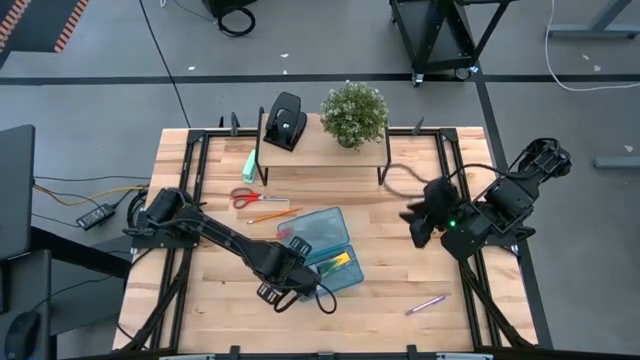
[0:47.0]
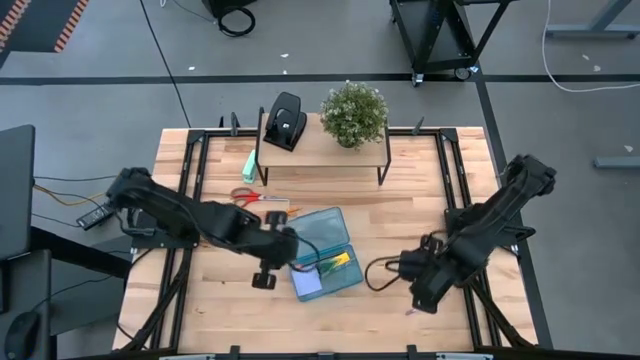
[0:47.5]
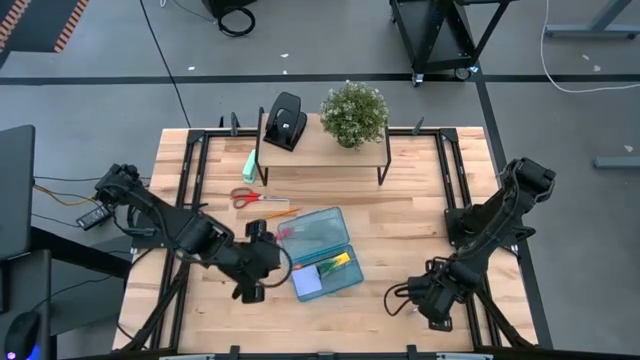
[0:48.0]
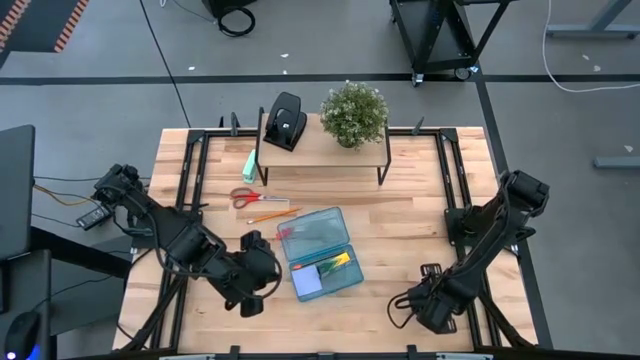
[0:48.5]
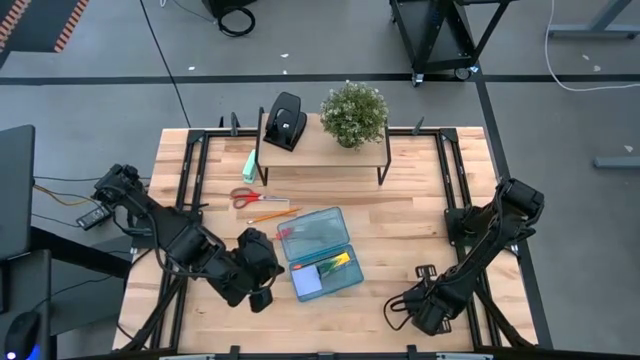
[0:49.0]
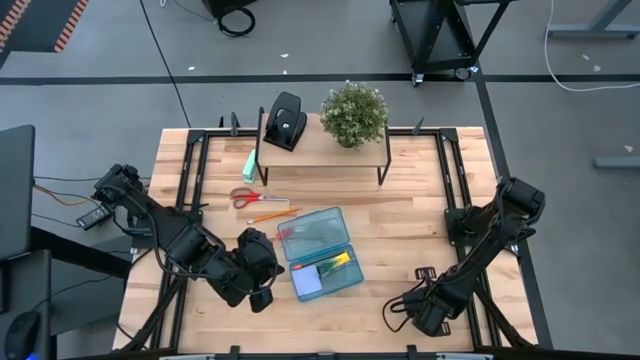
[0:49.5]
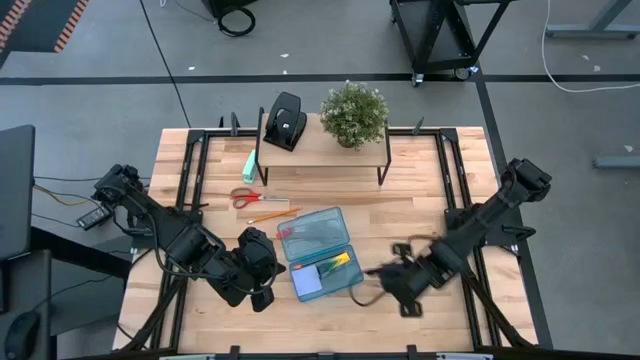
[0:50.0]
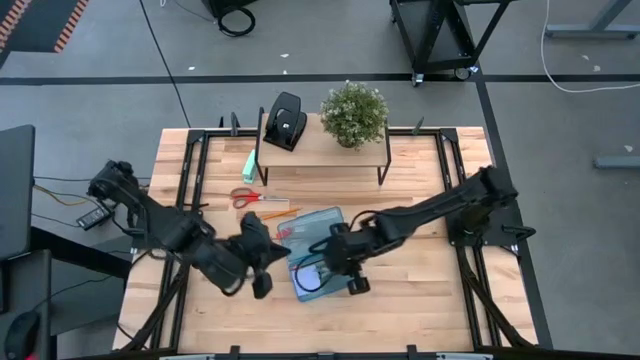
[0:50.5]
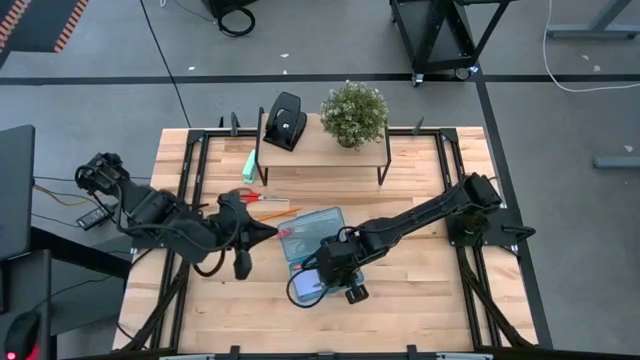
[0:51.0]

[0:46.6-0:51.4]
Task: Pack school essentials
Put the purple pen into the blue supply box

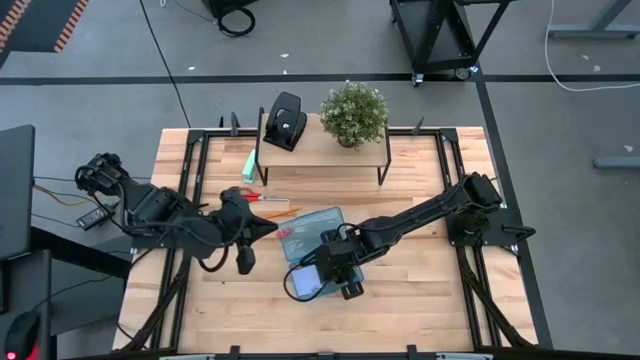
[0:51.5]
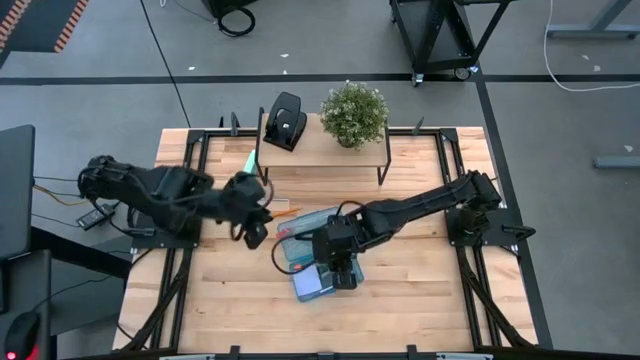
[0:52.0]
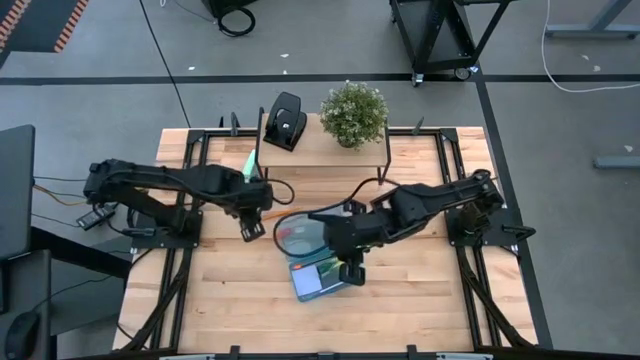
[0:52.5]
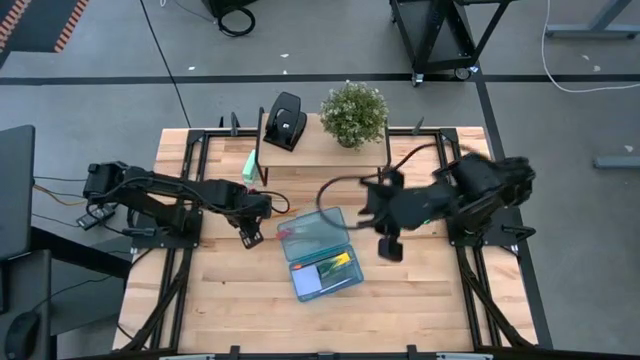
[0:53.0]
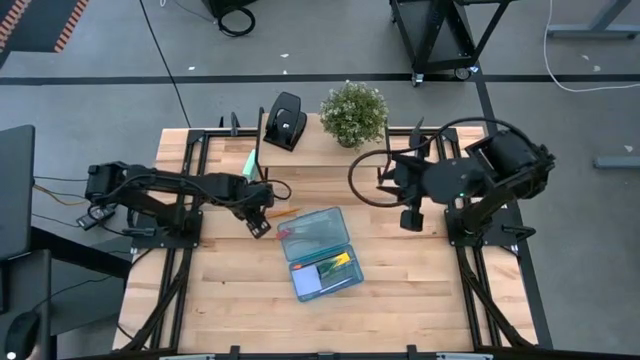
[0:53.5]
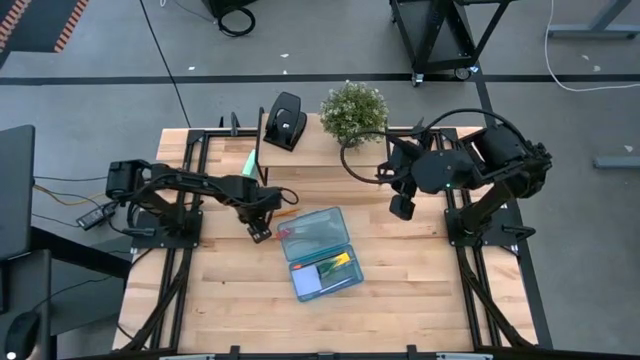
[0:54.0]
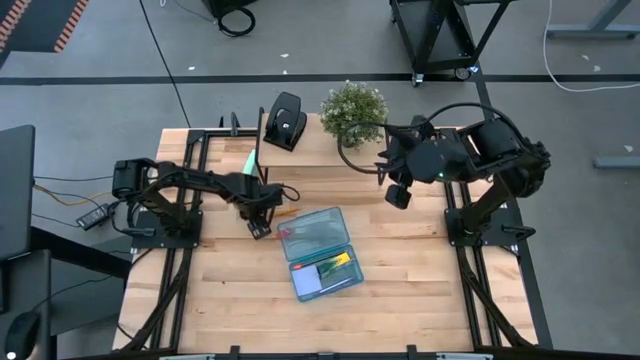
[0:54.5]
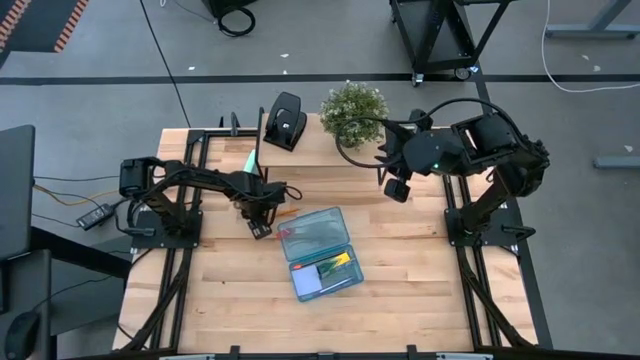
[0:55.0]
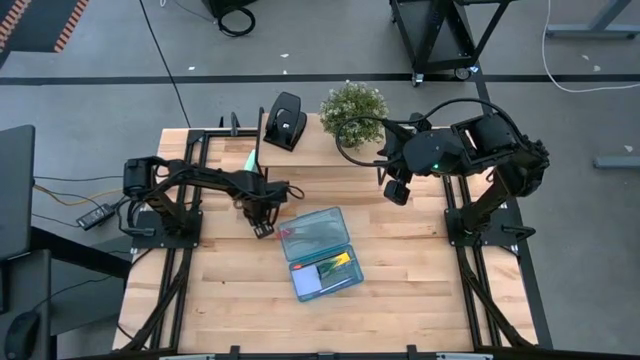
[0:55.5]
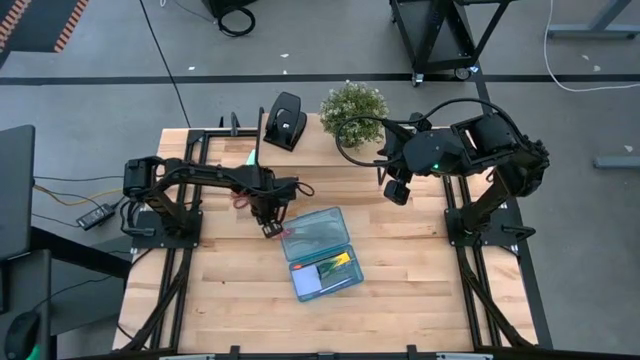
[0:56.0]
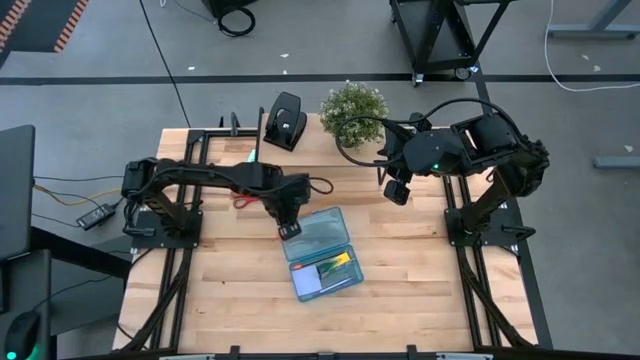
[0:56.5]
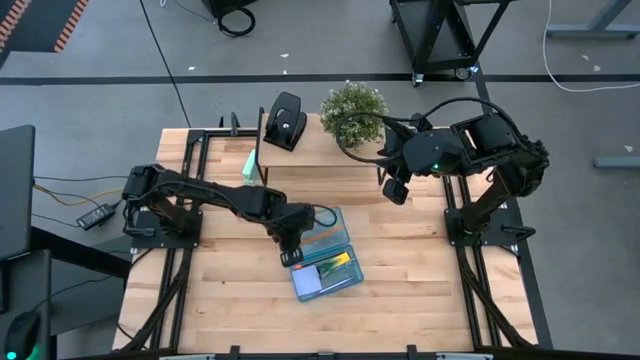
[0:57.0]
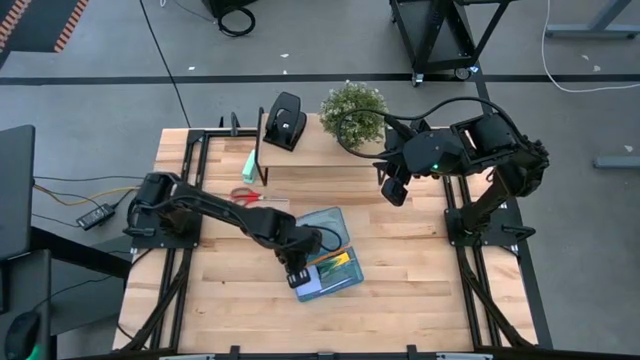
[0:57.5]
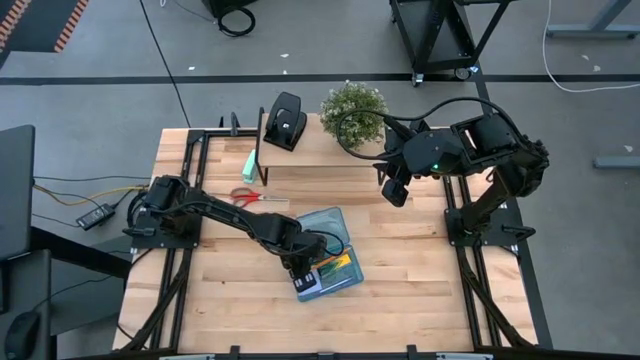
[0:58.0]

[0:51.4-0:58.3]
Put the orange pencil into the blue supply box

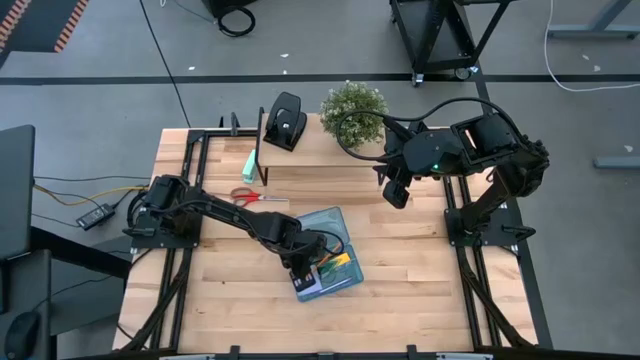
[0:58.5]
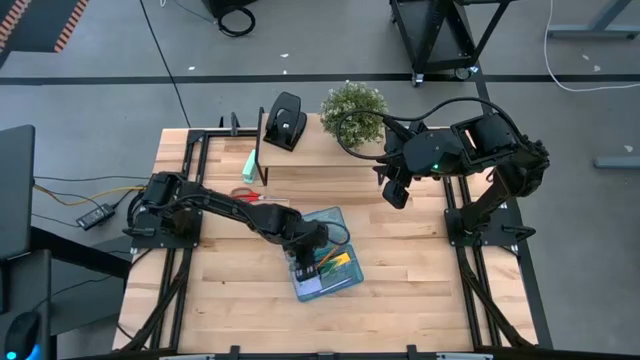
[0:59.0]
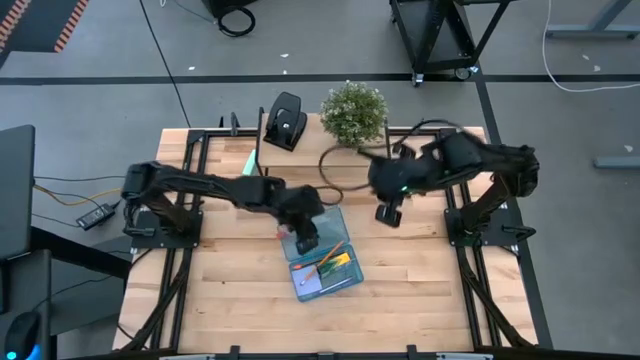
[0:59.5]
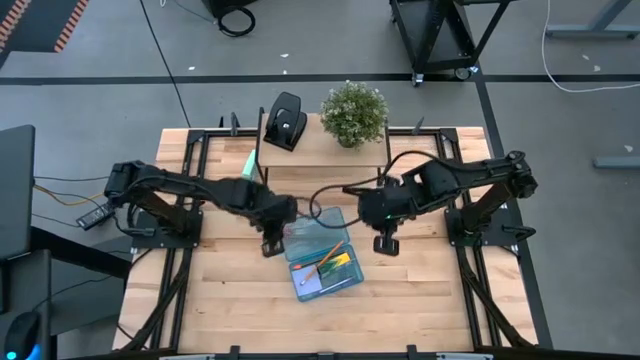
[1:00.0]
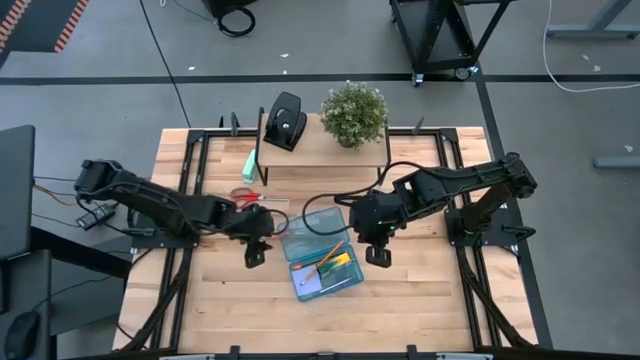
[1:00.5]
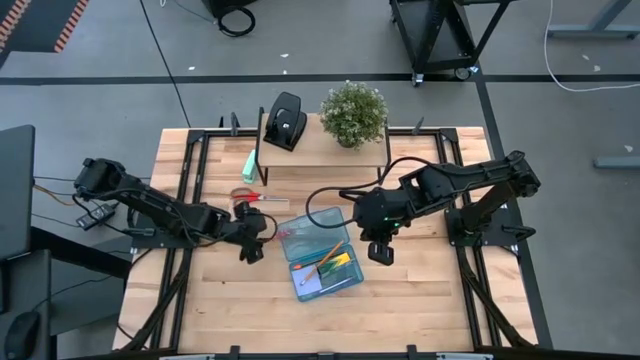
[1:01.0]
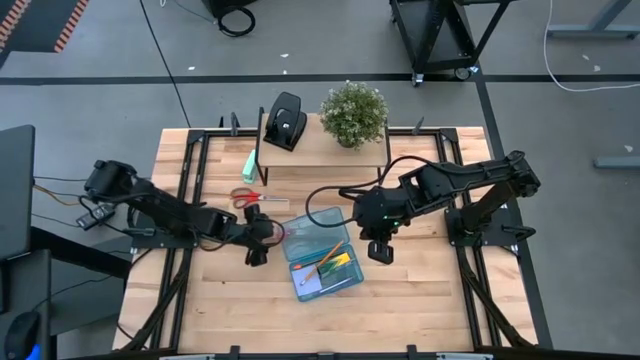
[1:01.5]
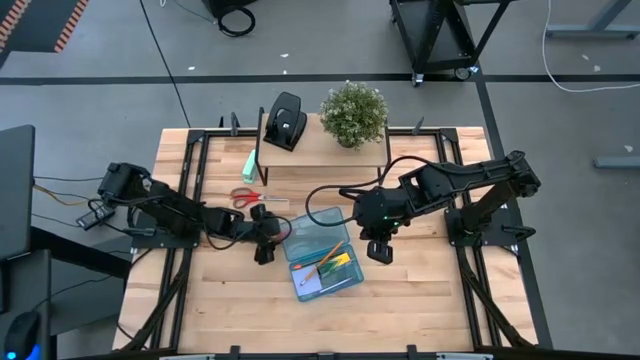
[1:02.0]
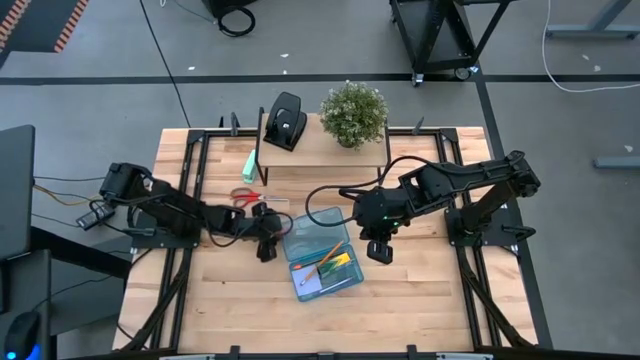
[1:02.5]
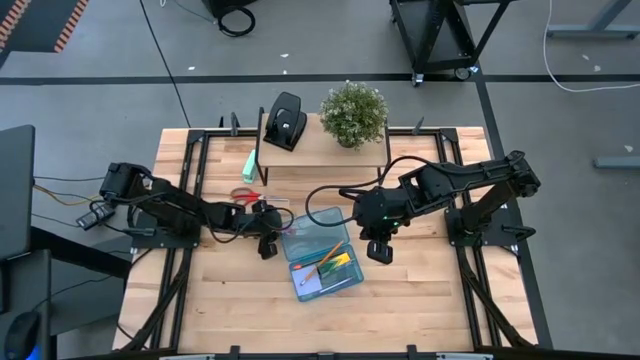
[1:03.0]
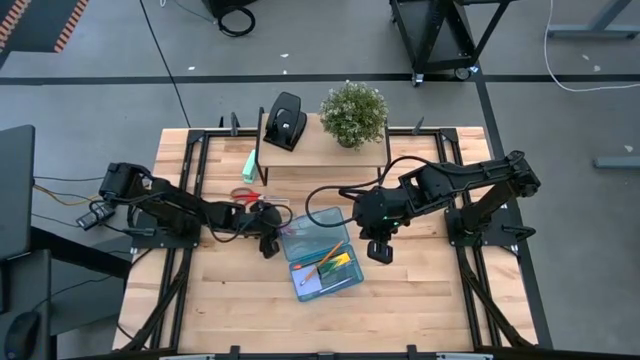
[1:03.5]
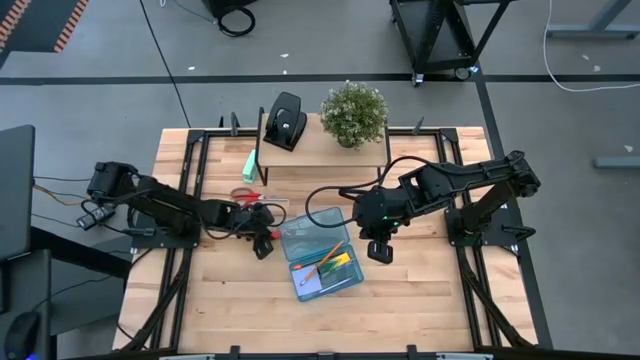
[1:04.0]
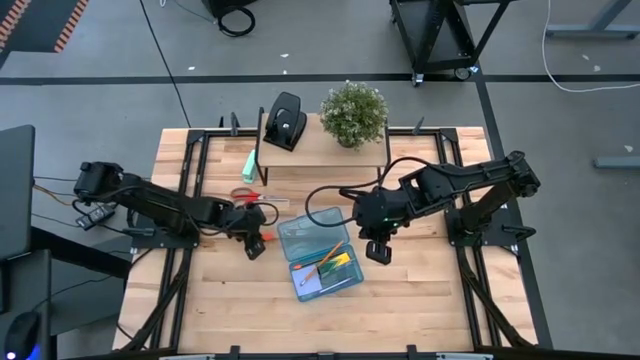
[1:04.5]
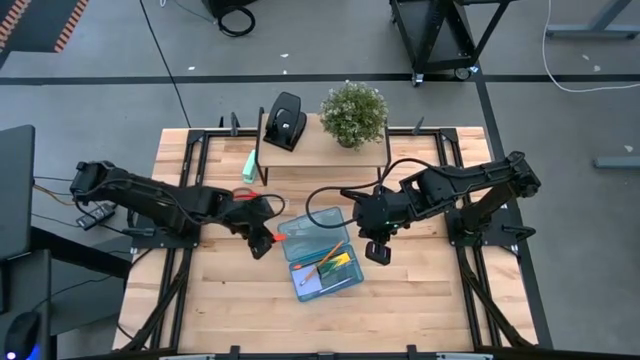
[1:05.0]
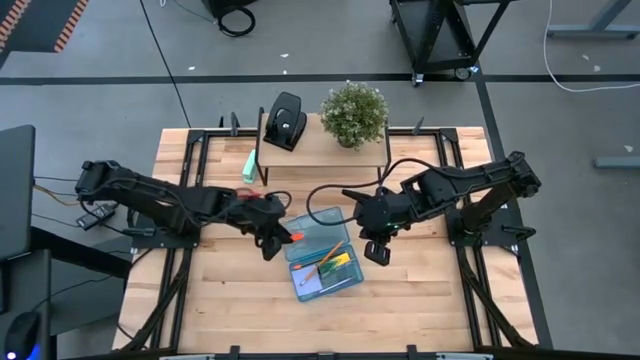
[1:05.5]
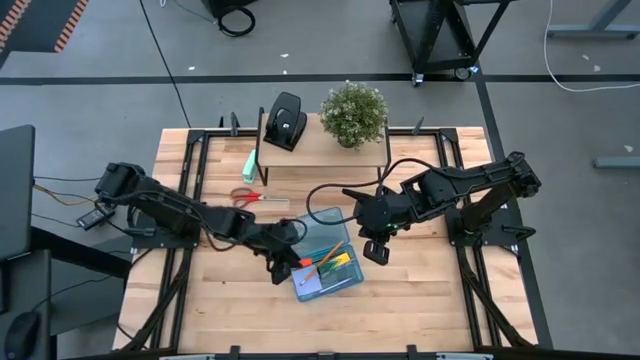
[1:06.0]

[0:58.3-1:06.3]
Put the orange eraser into the blue supply box

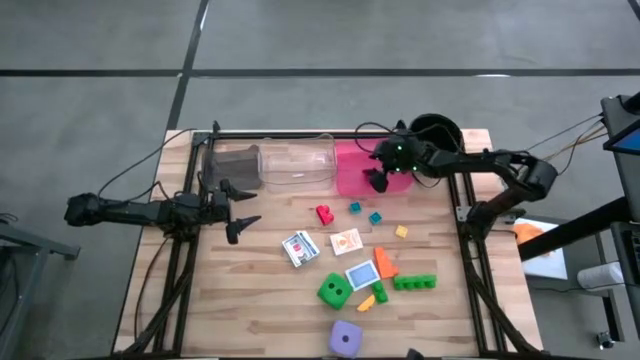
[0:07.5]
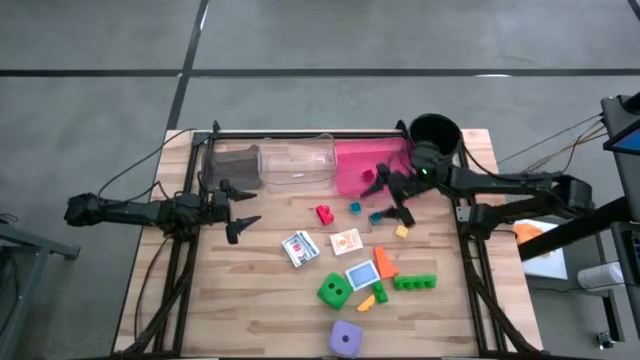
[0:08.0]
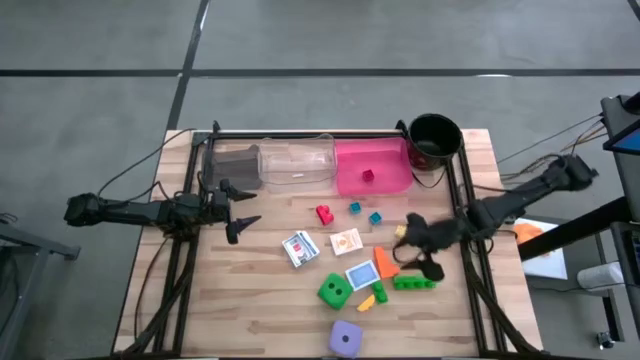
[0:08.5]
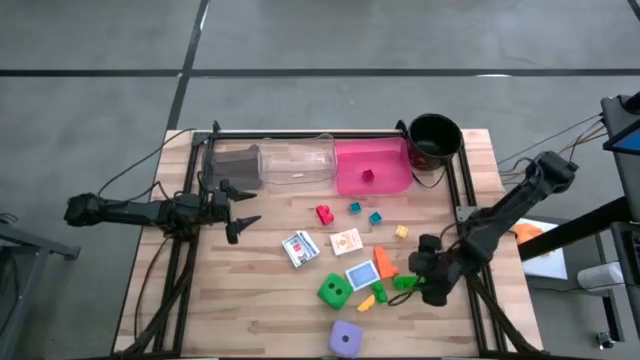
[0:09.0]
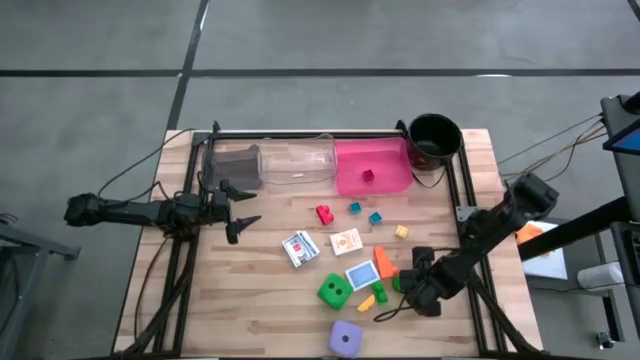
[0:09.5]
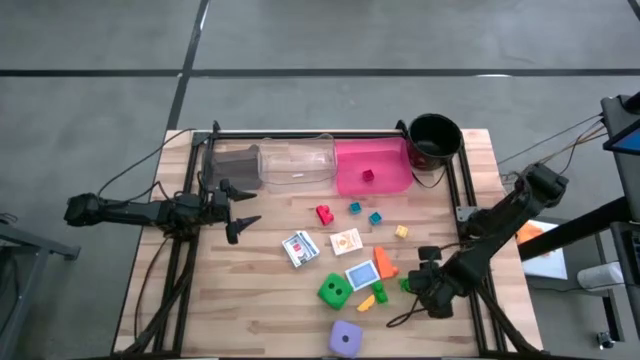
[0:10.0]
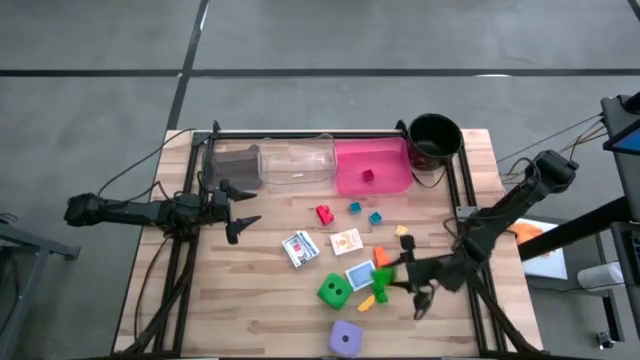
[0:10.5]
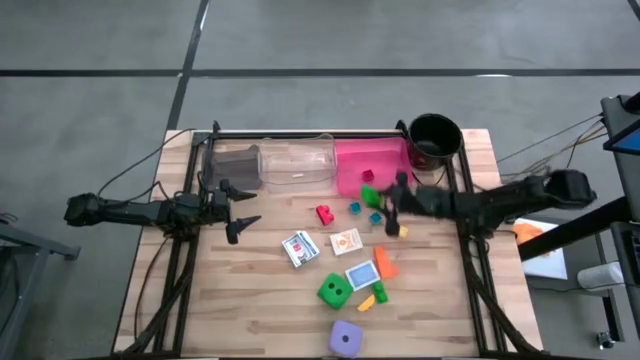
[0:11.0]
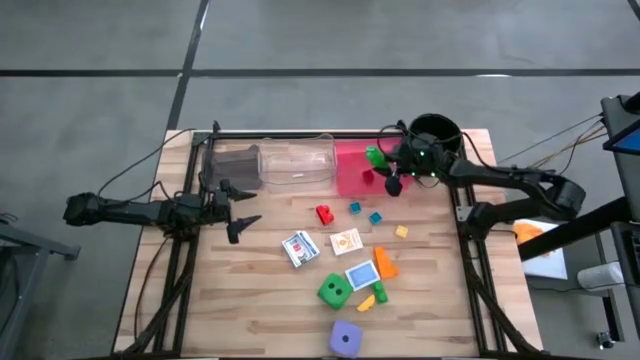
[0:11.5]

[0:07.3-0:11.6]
Task: Pick & Place Toys
Put the green game piece into the pink bin
